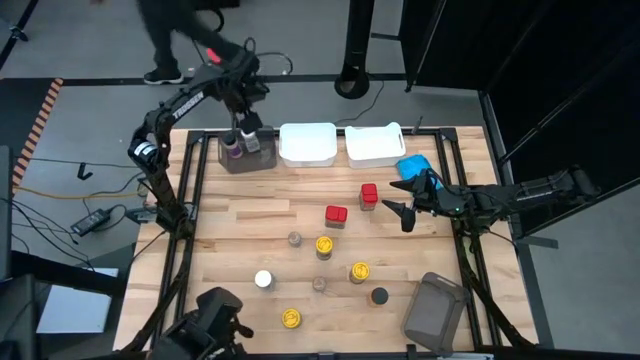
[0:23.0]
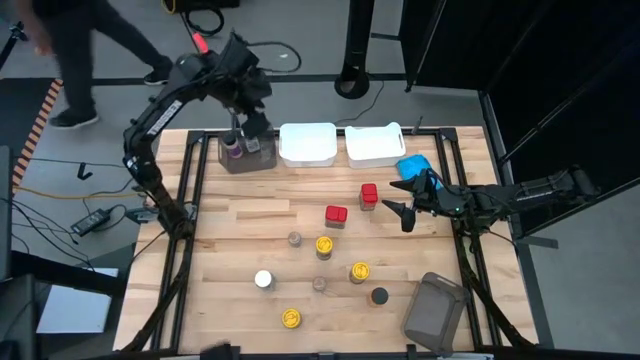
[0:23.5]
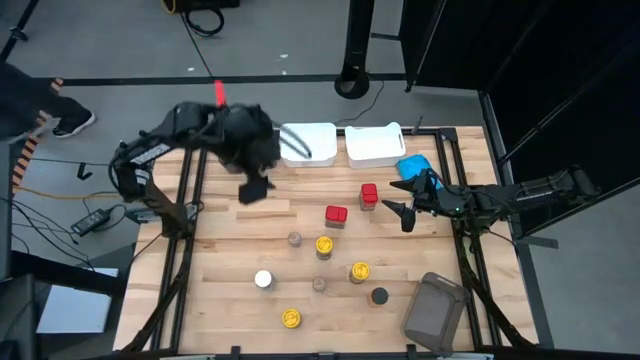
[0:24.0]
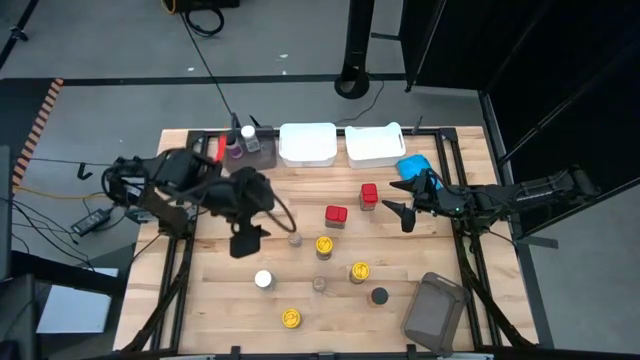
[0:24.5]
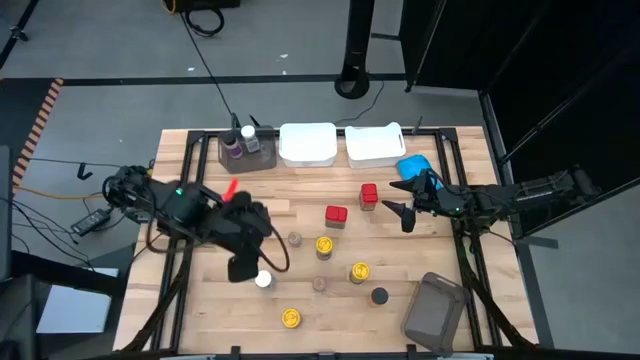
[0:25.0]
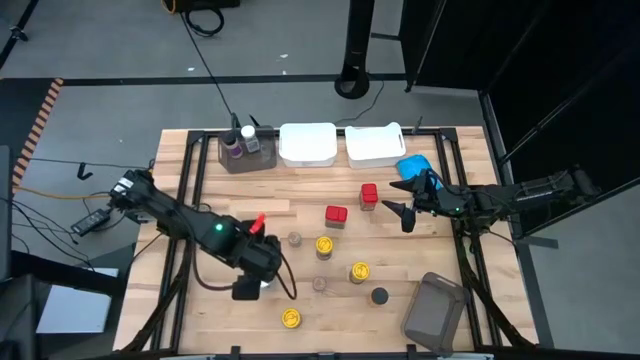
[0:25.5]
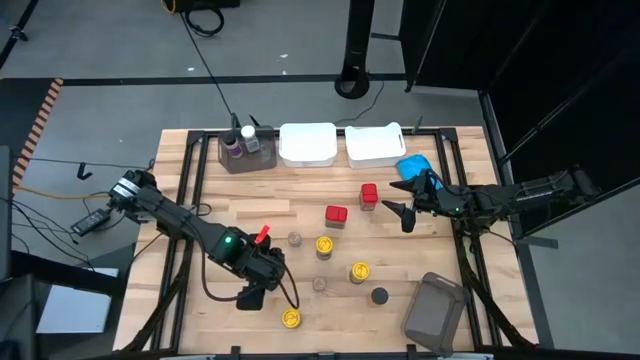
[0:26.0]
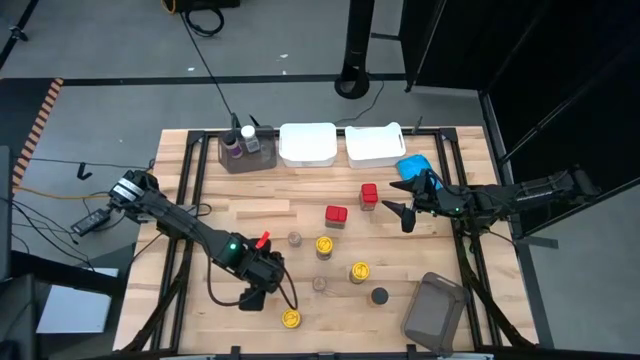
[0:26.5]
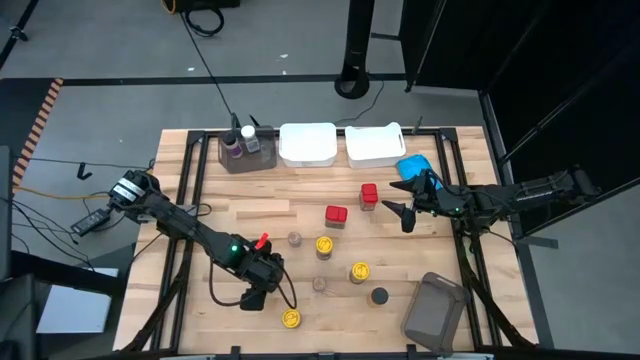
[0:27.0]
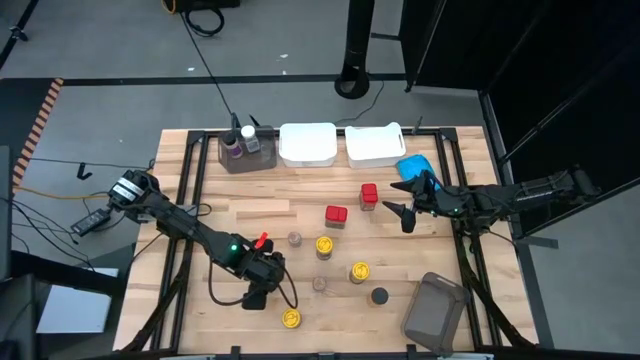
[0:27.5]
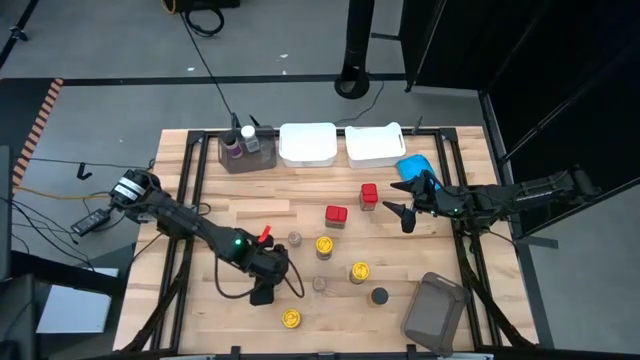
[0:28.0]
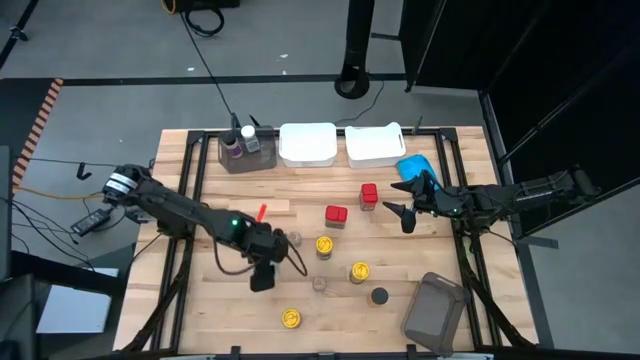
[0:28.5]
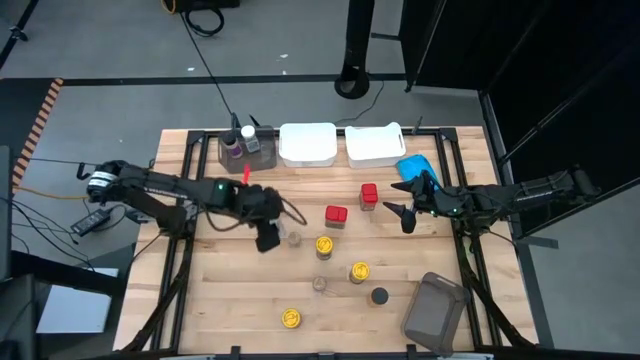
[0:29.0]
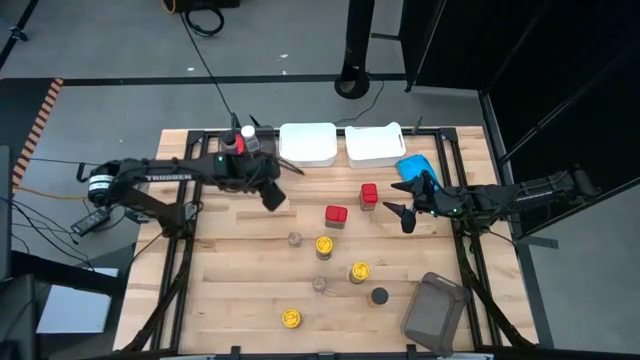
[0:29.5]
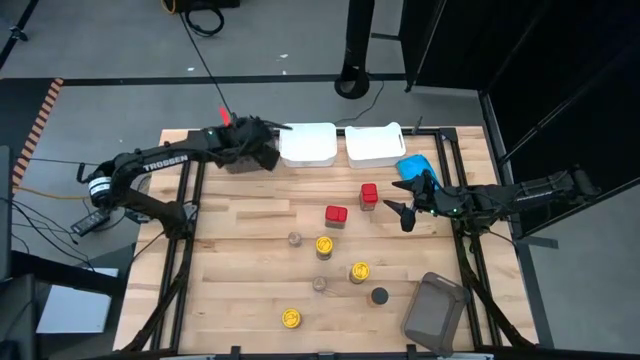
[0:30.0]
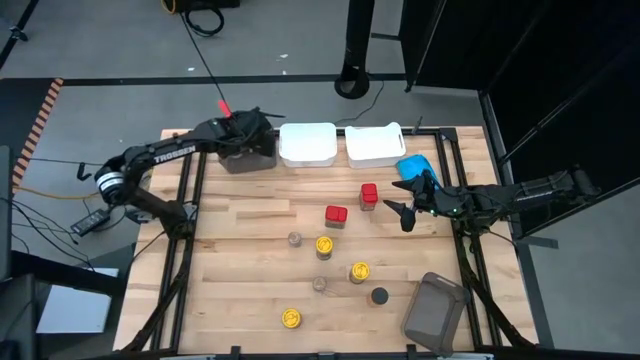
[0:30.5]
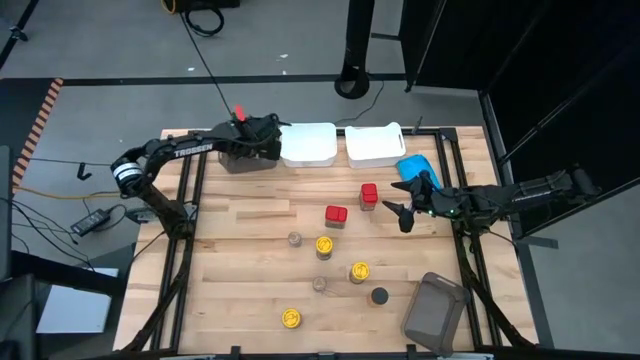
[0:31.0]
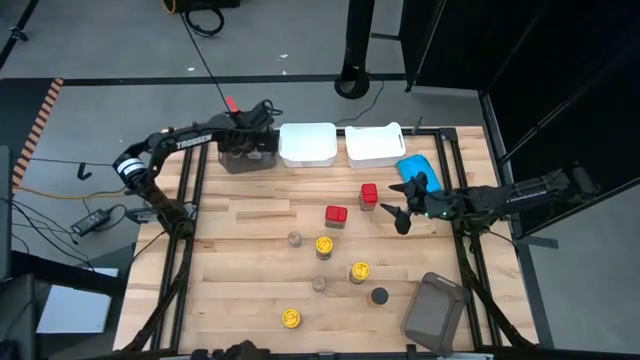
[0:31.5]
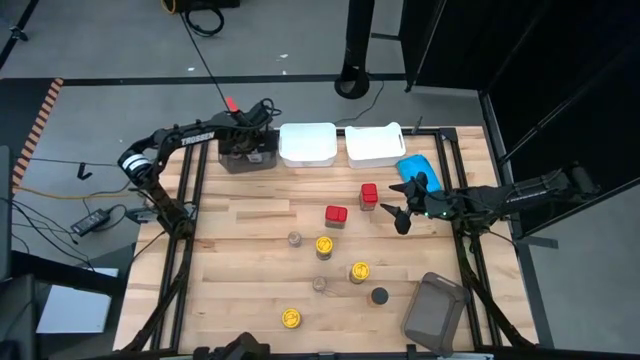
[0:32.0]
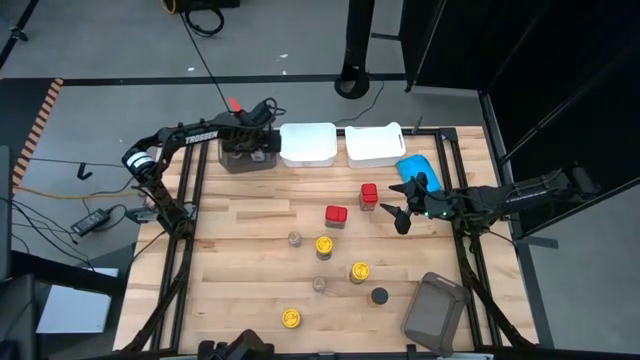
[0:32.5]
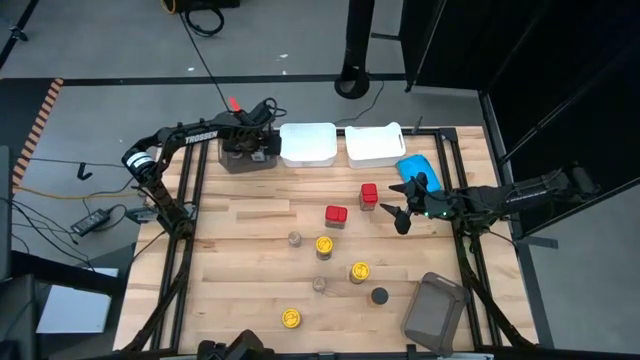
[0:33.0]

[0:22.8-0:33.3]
Task: Sort spices by type
Put the white seasoning bottle into the black bin

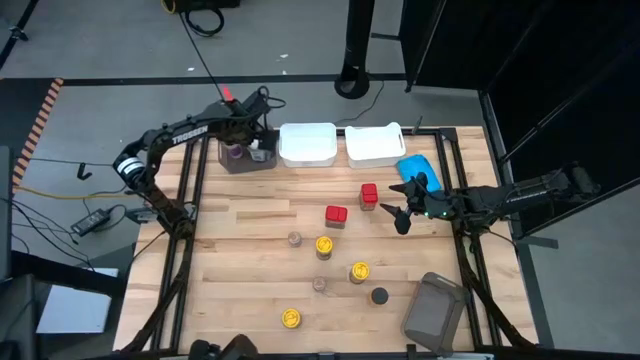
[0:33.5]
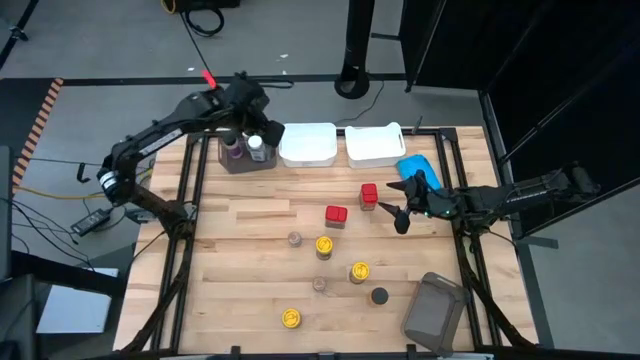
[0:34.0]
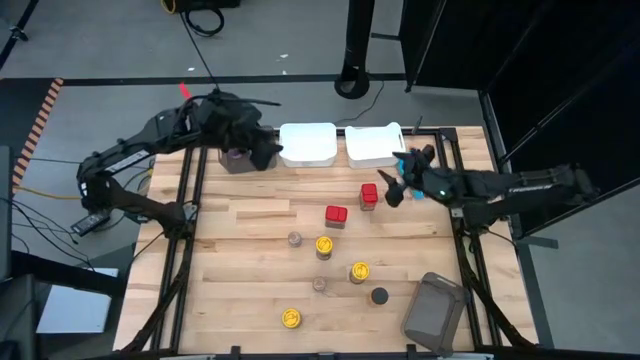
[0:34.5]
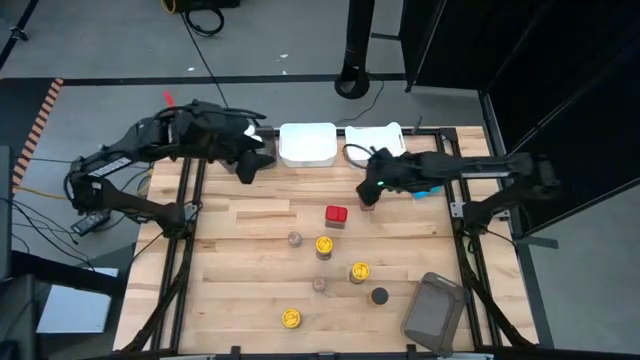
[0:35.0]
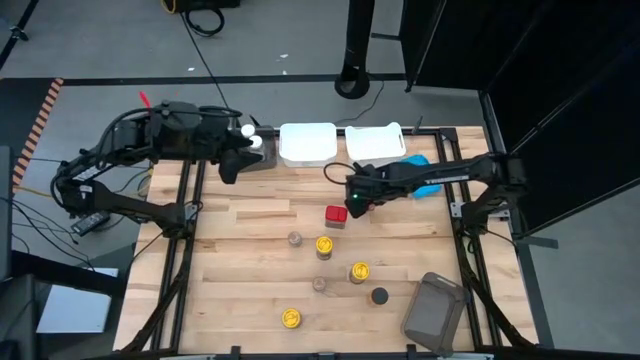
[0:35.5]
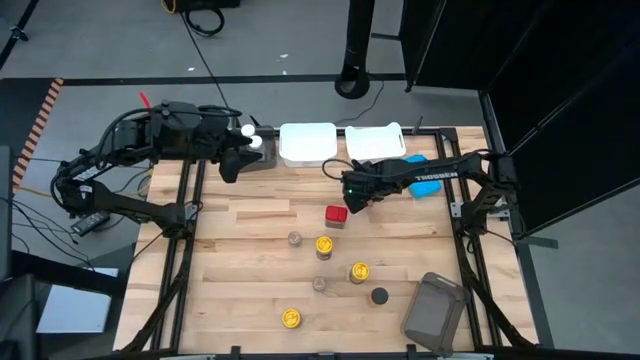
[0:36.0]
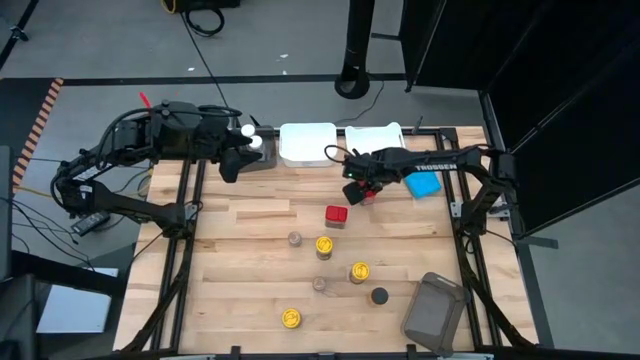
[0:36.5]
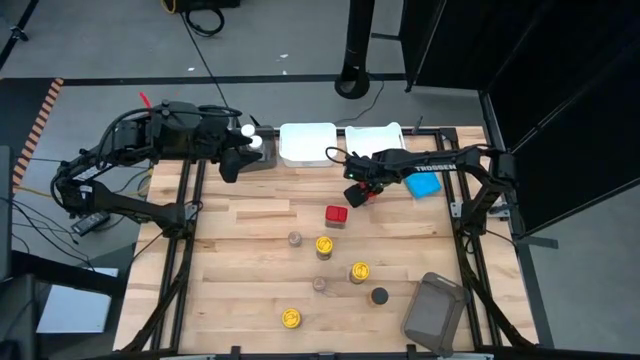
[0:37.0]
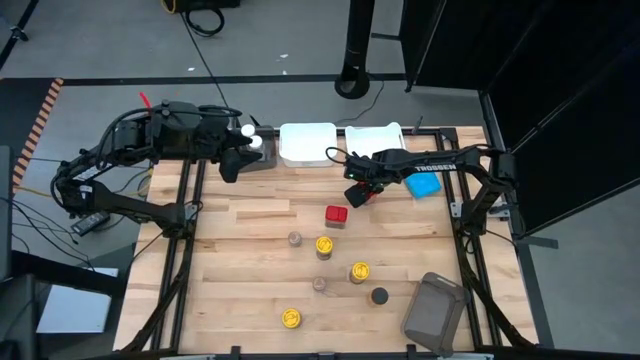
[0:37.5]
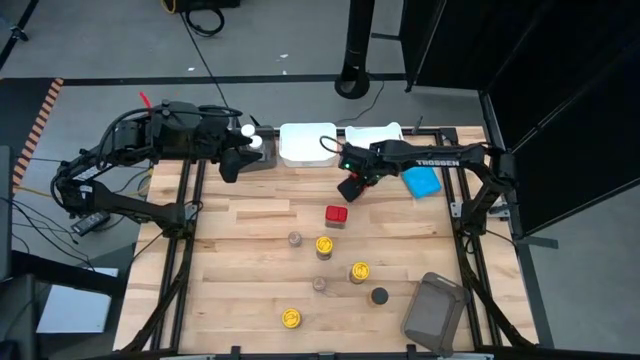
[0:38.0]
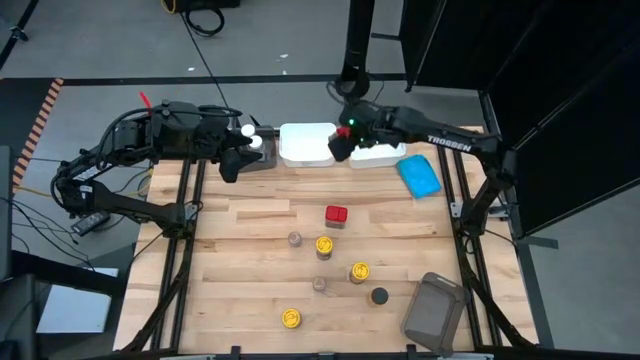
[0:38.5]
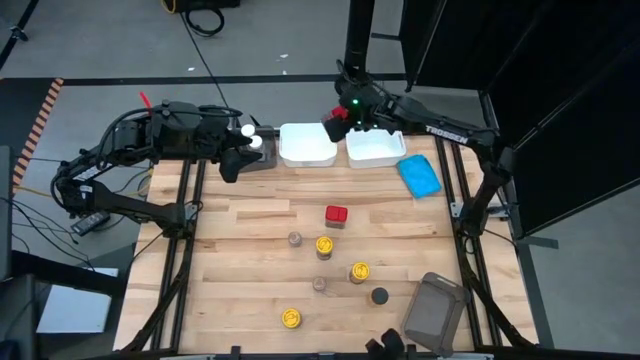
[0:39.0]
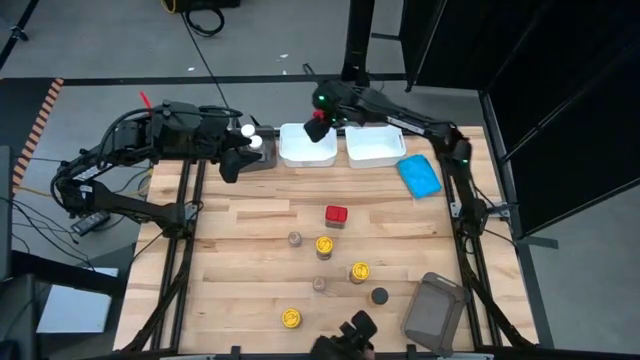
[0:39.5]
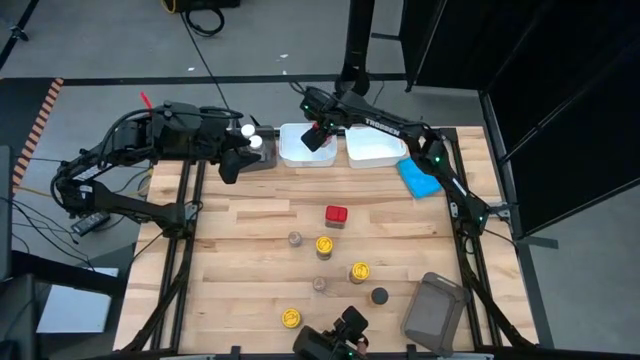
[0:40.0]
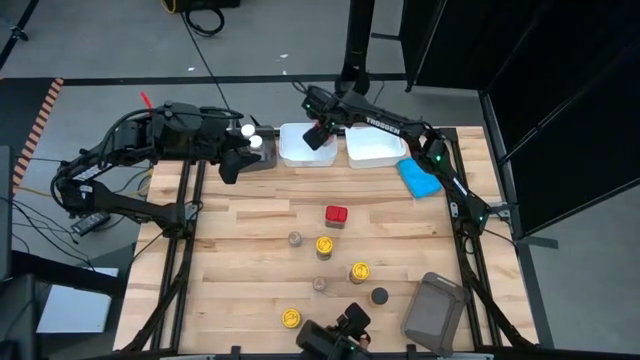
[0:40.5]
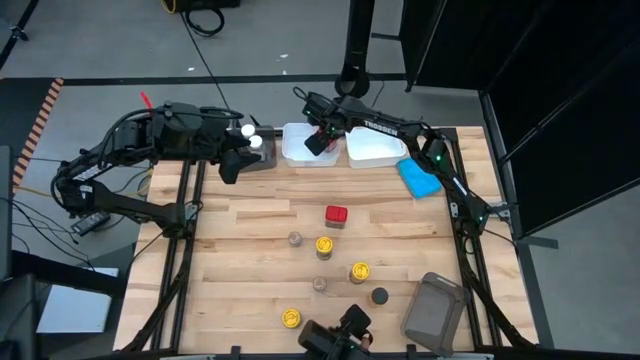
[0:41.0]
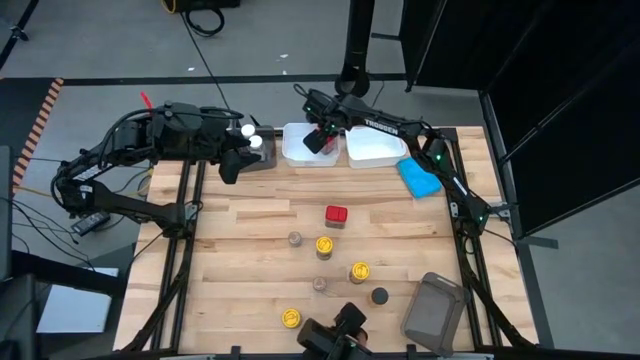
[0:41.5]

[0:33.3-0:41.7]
Put the top red seasoning bottle into the left white bin

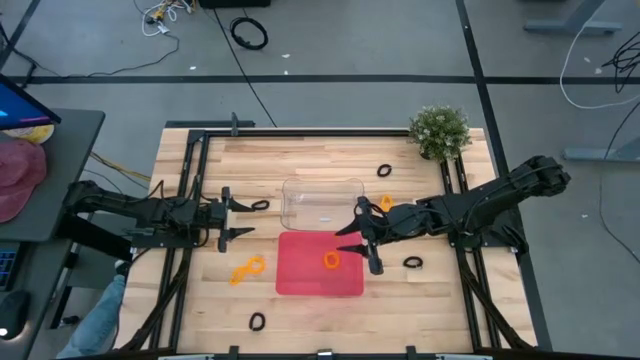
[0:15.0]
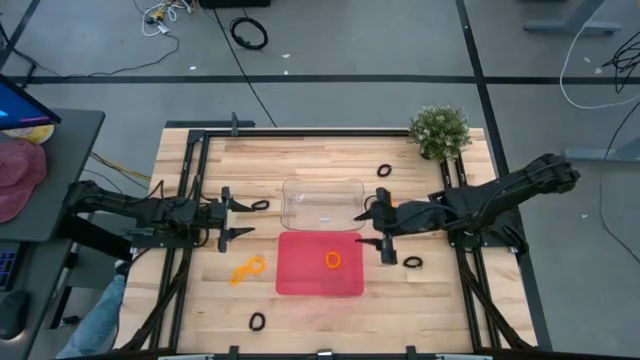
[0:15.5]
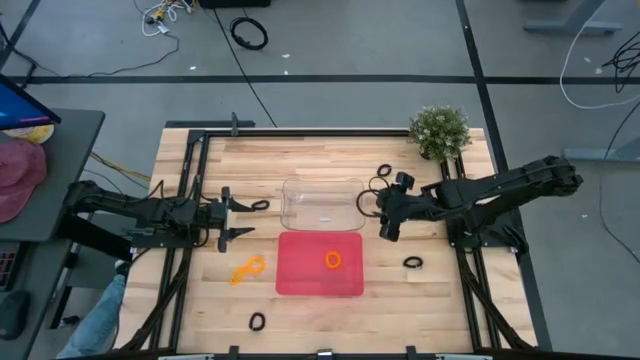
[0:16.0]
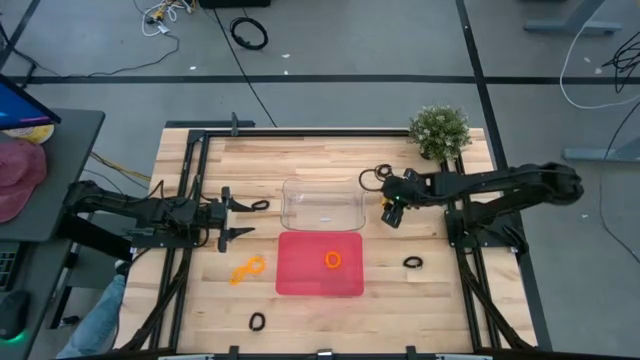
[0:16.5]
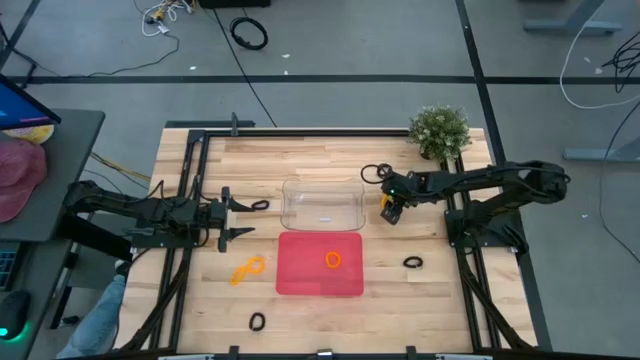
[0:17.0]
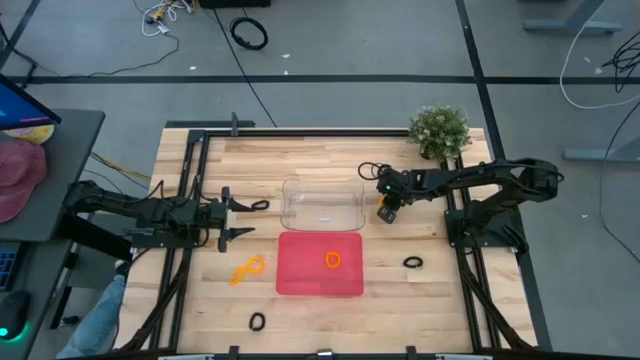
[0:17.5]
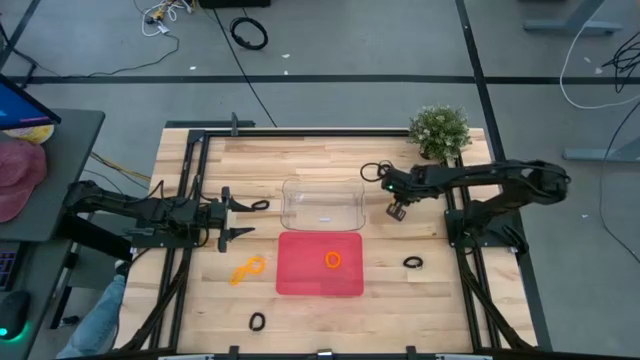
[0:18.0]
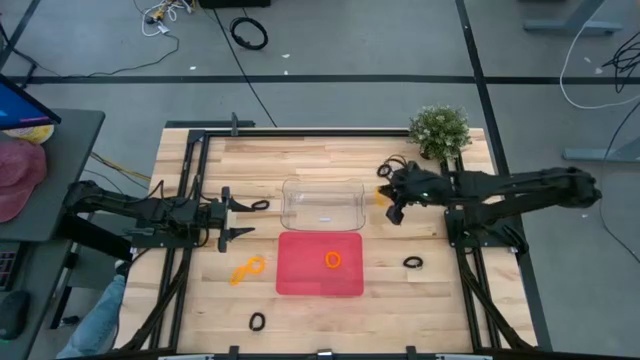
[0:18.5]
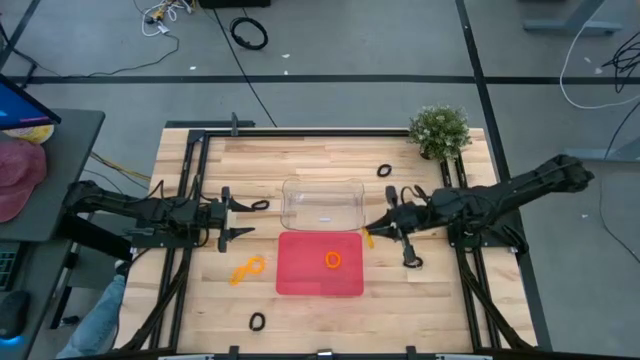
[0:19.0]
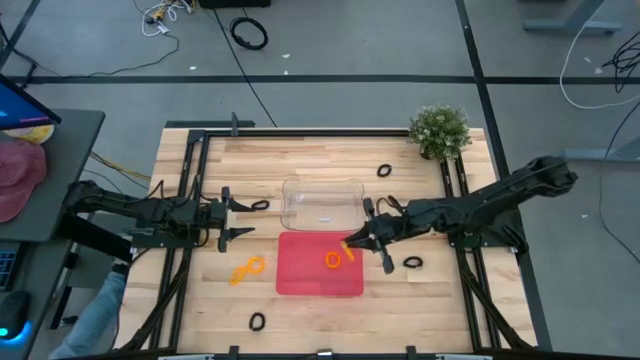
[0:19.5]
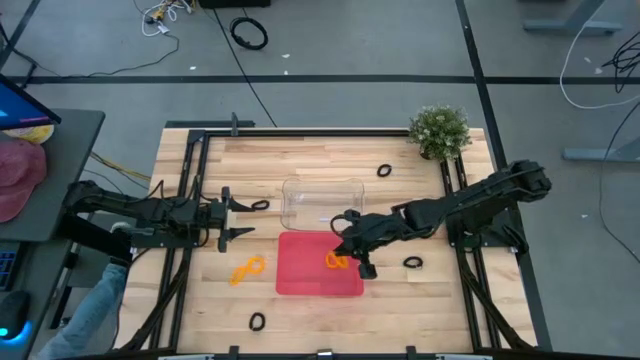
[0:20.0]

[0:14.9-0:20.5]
Task: Sort spring keychains
Put the orange spring keychain into the pink bin
